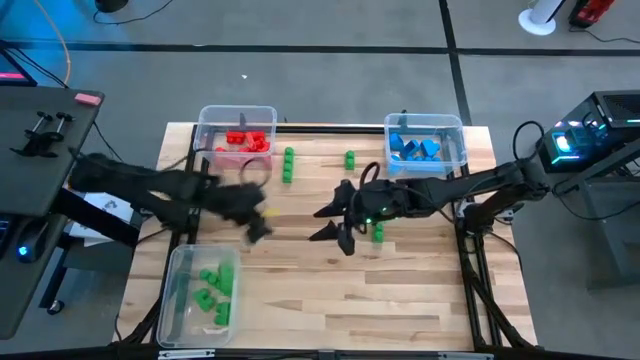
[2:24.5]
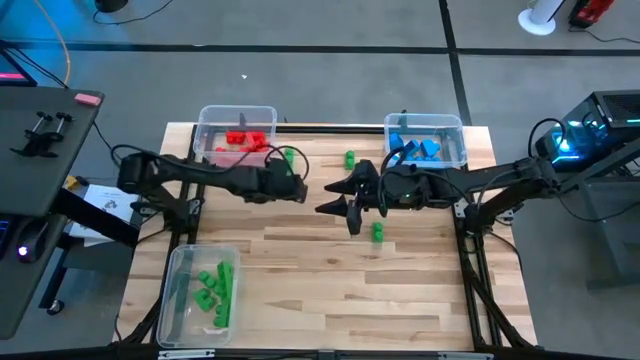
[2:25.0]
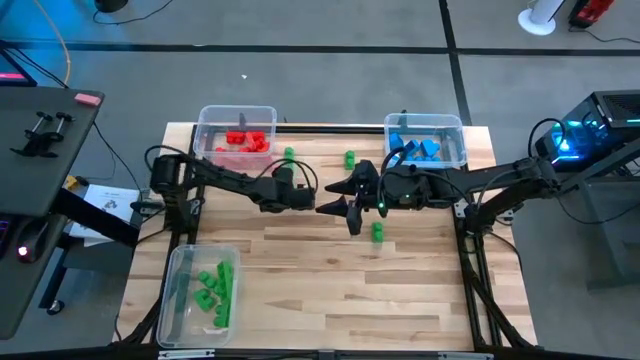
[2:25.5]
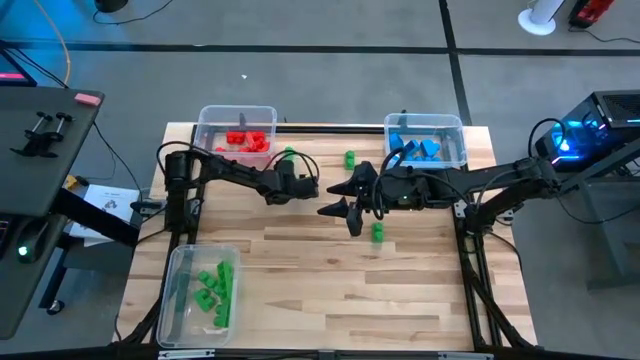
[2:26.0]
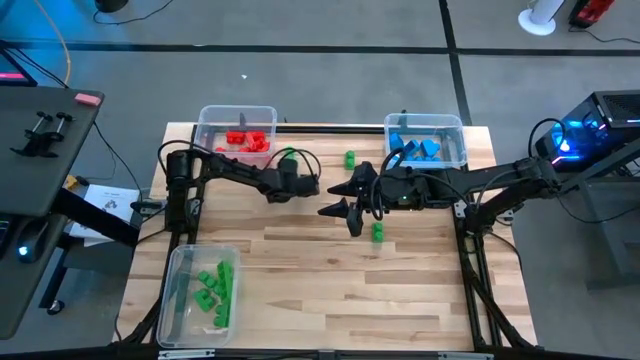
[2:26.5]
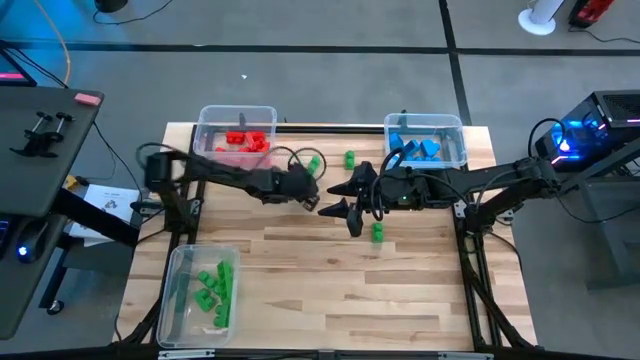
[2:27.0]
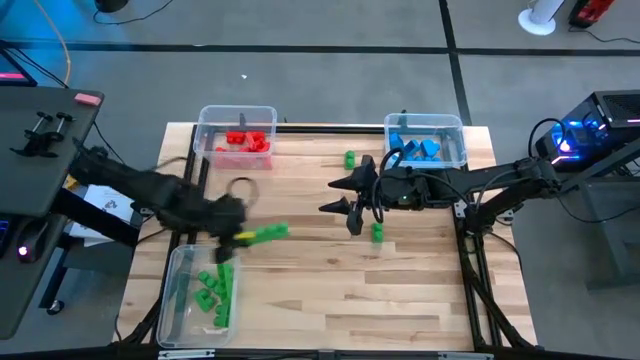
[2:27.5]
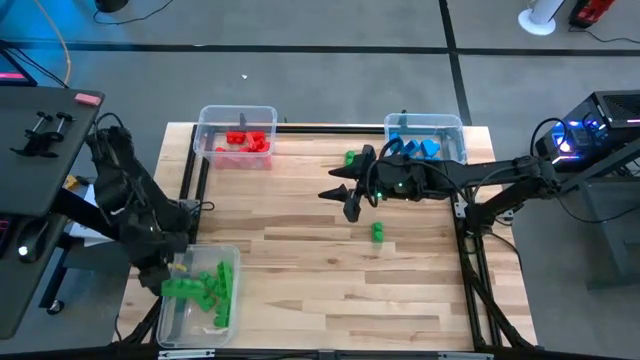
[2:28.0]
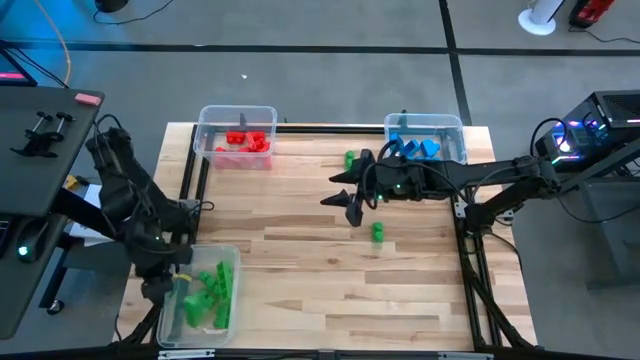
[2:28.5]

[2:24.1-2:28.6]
Task: Sort blocks
Put the green game piece into the bottom left transparent bin

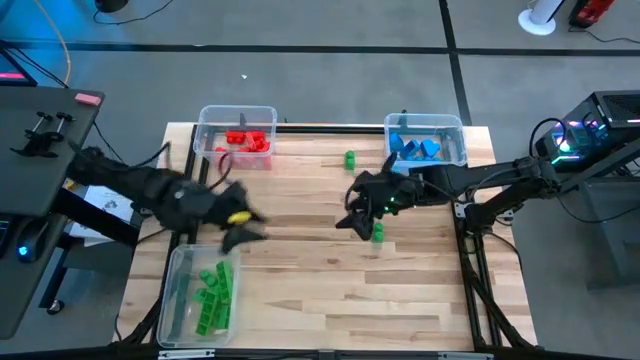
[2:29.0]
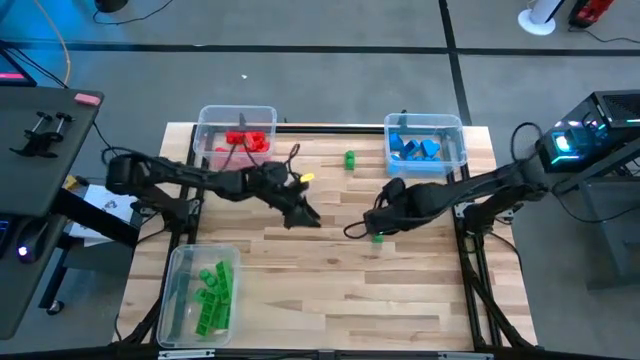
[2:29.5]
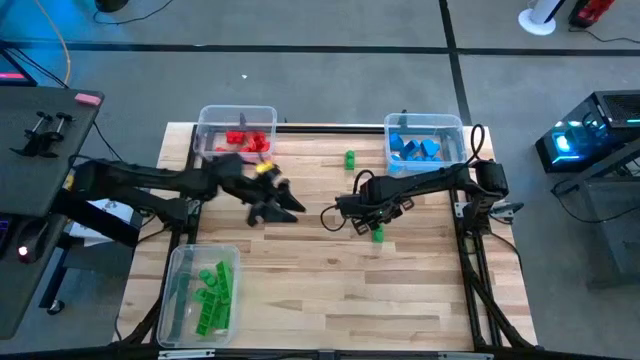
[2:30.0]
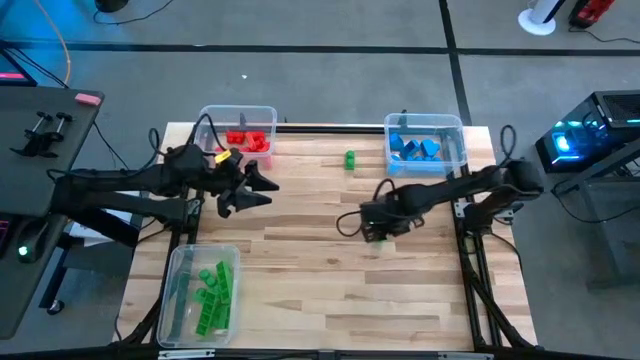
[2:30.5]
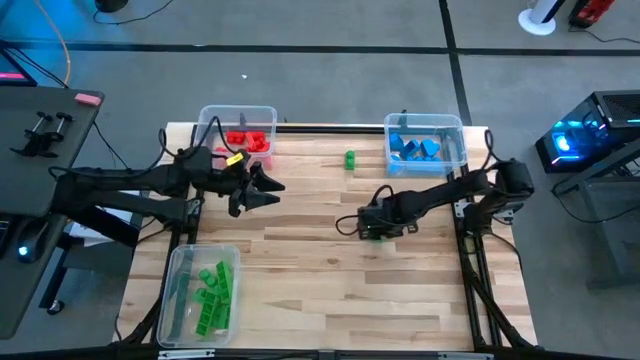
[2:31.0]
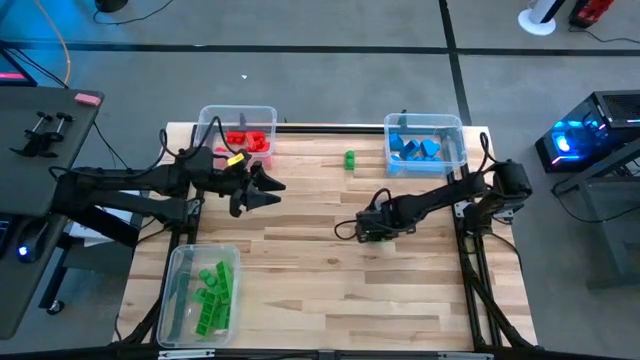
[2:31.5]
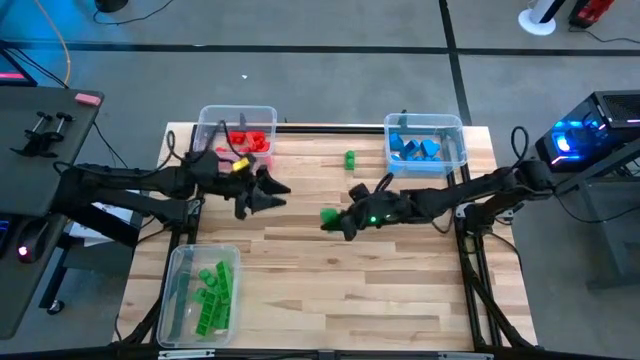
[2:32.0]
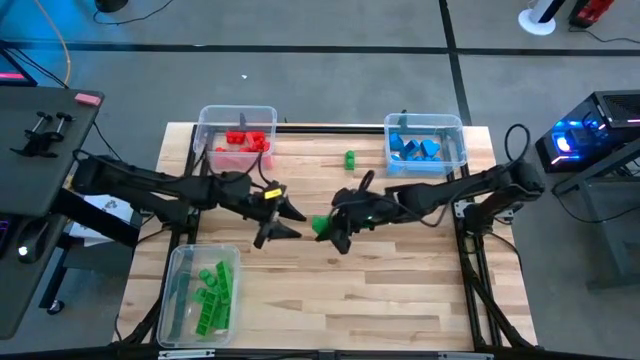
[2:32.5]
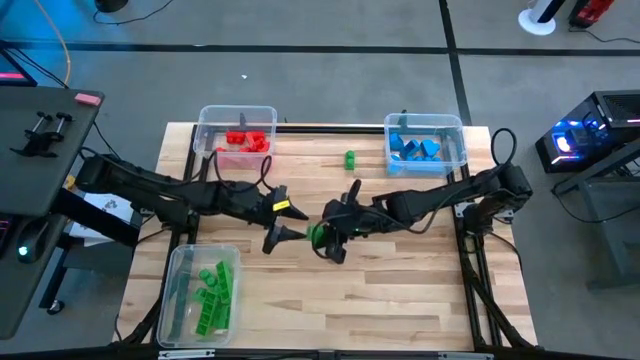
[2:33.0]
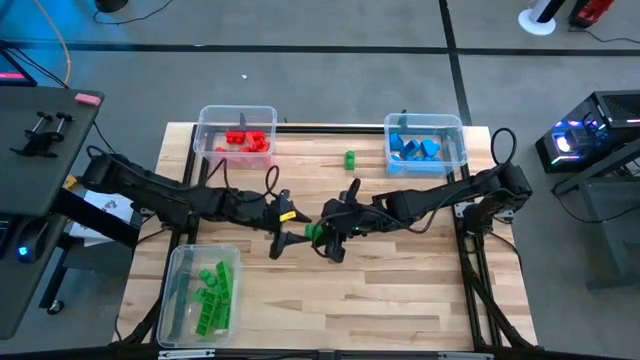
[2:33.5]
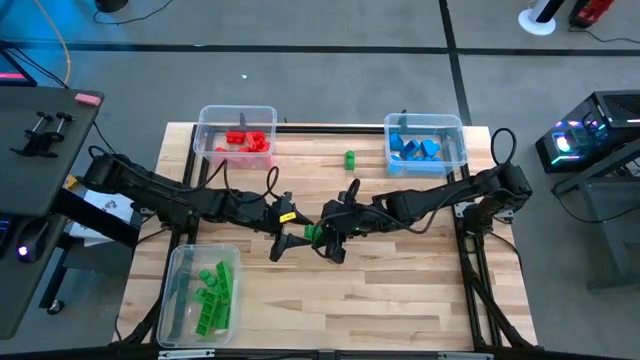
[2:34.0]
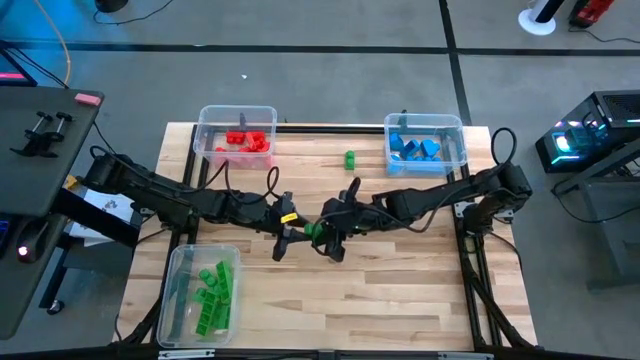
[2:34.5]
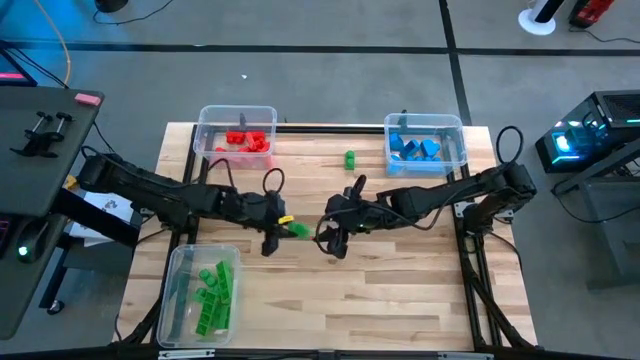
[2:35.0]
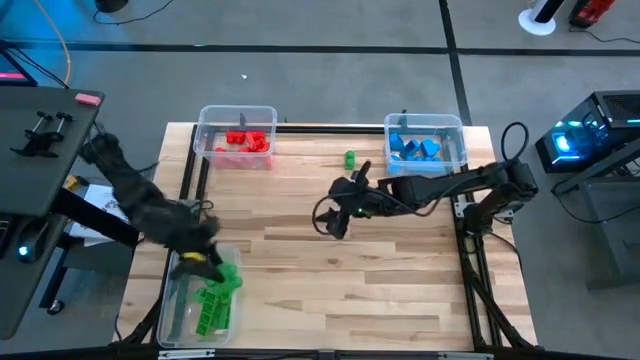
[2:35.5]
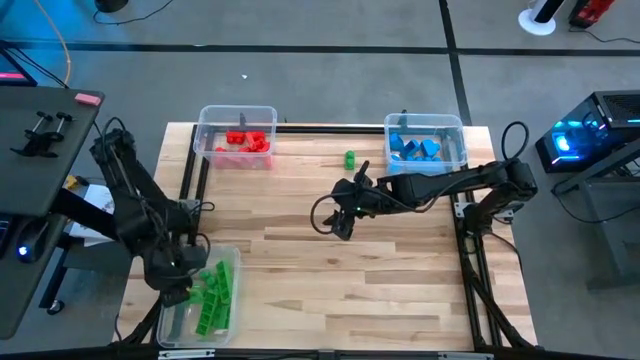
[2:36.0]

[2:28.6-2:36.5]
Put the green game piece into the bottom left transparent bin

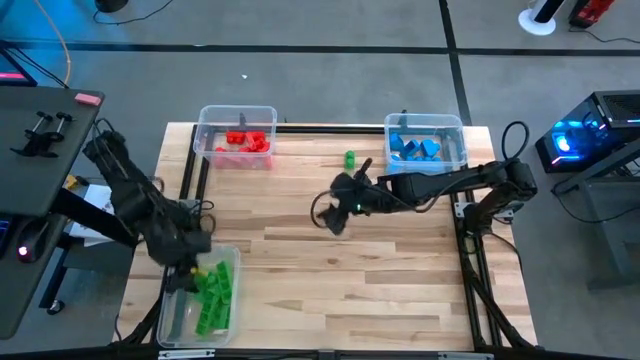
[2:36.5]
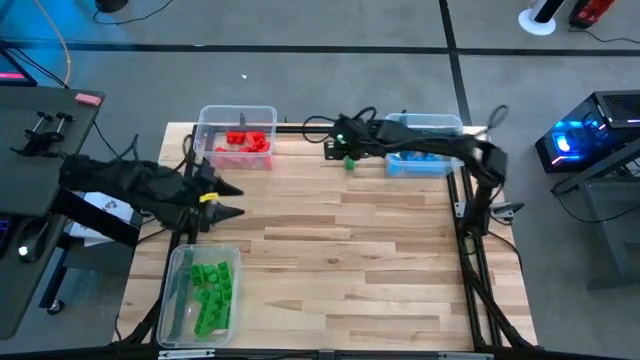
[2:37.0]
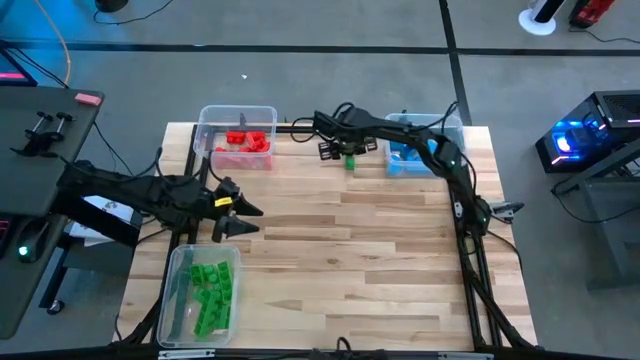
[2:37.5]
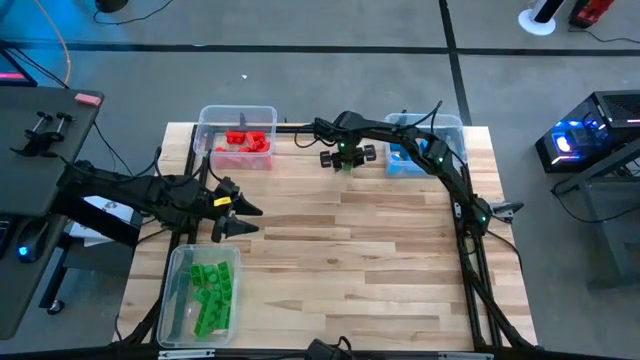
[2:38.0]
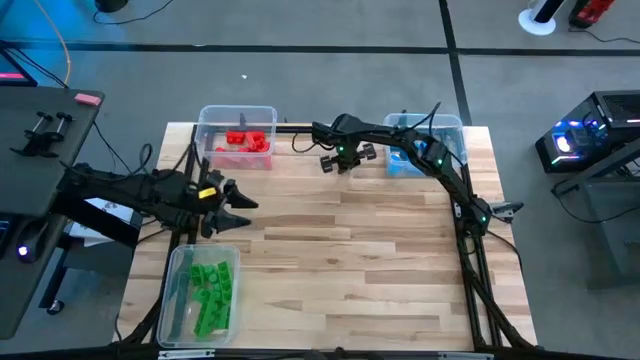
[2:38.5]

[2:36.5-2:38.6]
Put the green game piece into the bottom left transparent bin

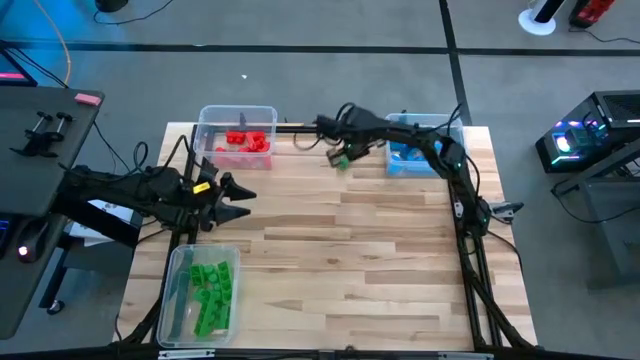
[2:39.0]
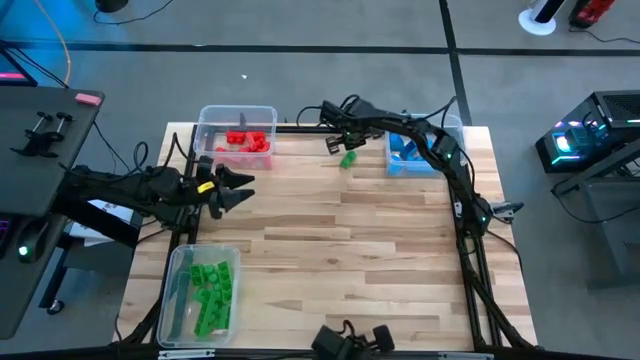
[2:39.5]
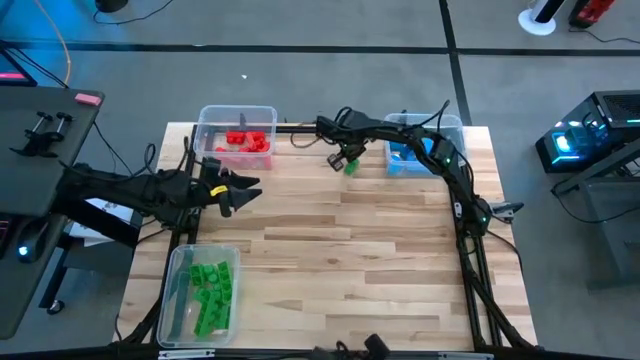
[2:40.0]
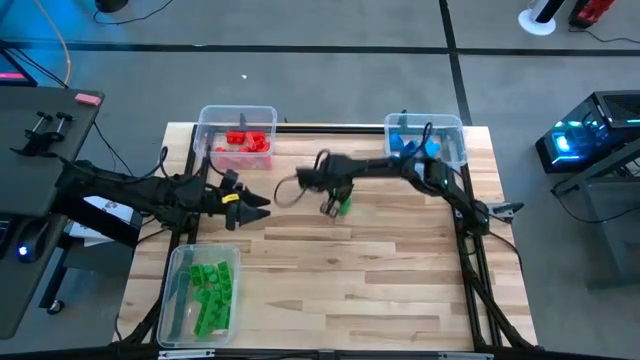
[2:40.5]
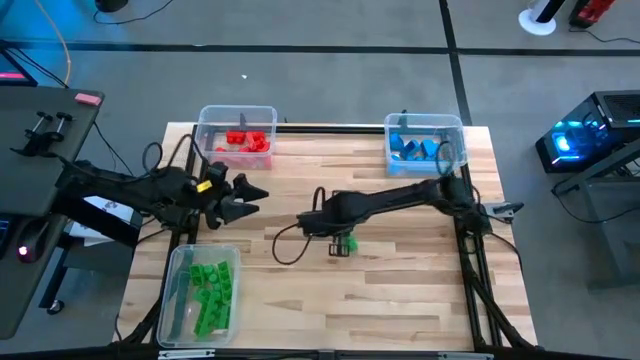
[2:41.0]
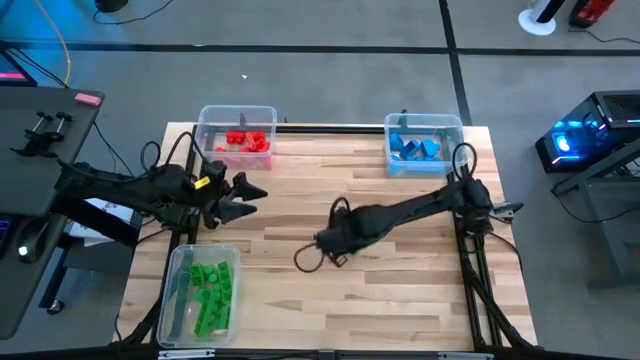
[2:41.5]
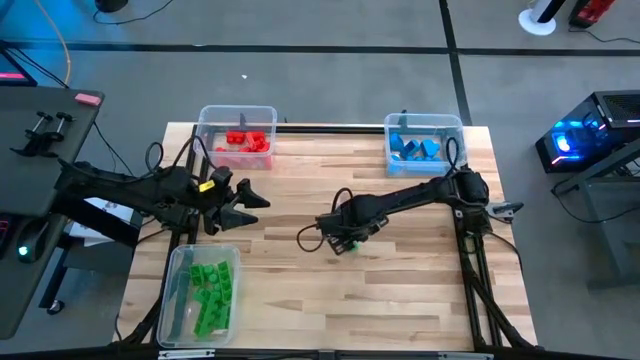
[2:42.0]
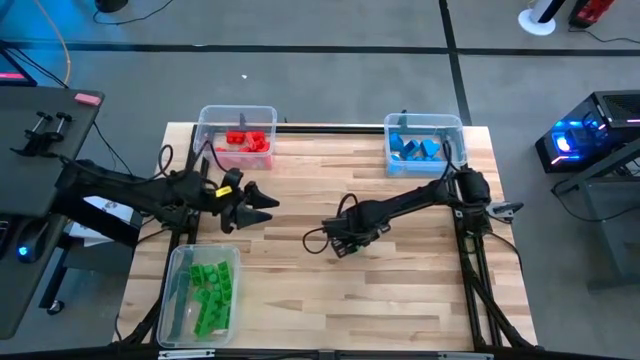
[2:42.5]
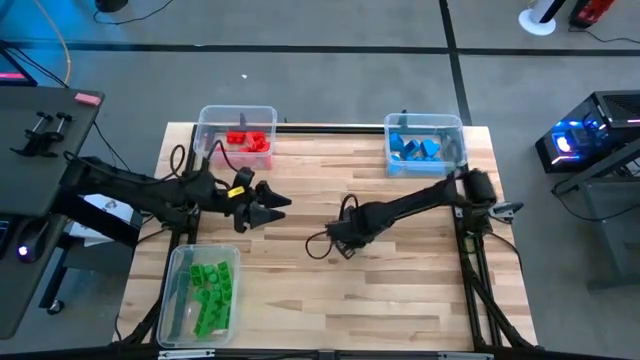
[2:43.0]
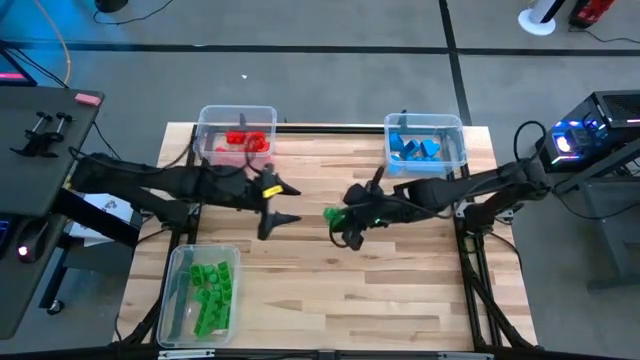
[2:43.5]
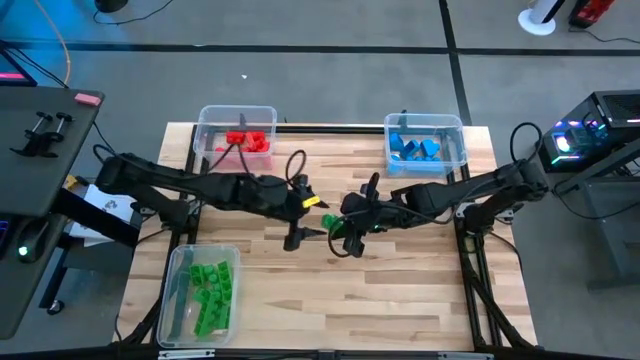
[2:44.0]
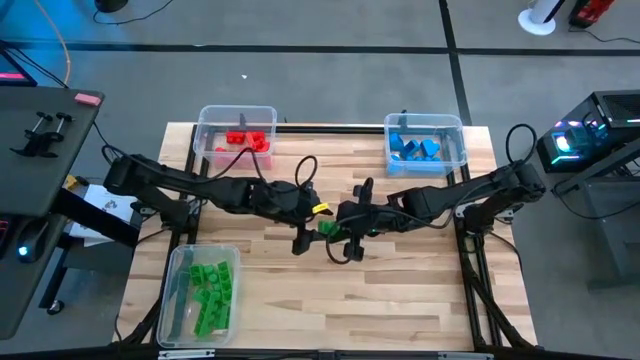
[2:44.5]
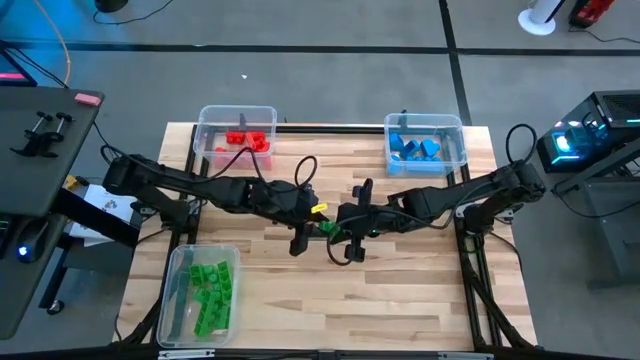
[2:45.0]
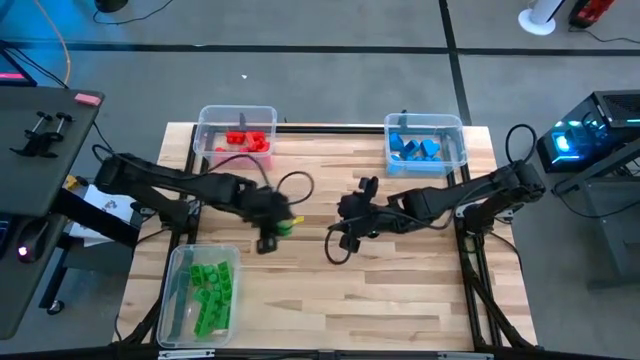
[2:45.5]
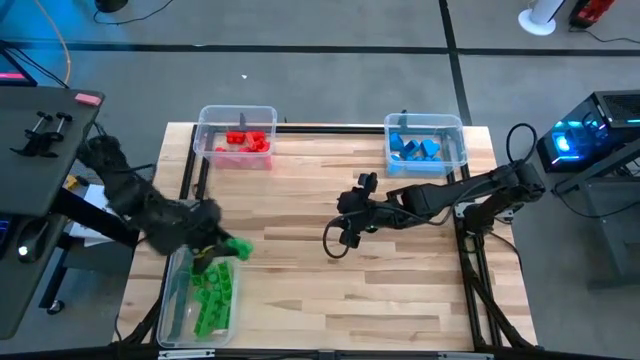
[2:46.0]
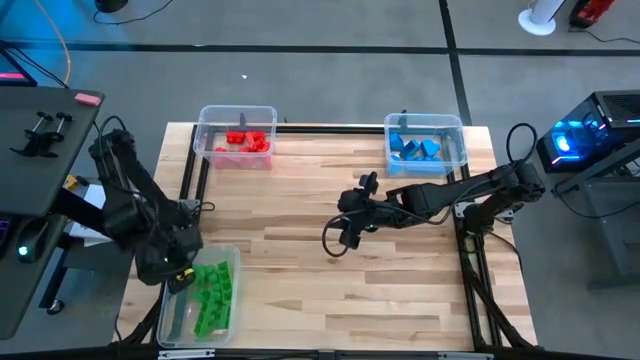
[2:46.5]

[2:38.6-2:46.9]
Put the green game piece into the bottom left transparent bin
